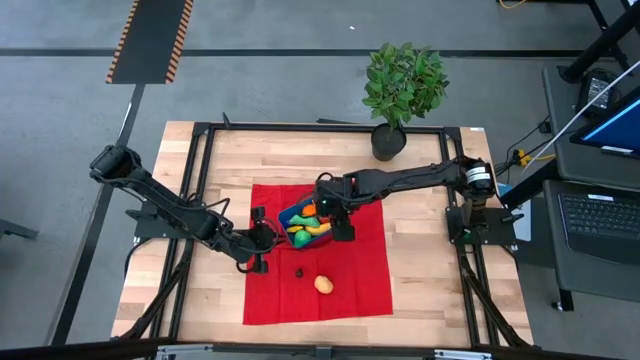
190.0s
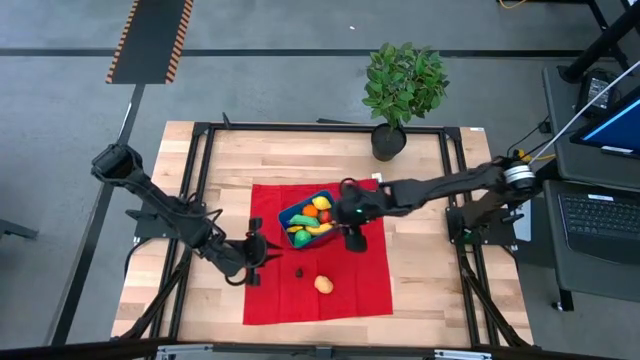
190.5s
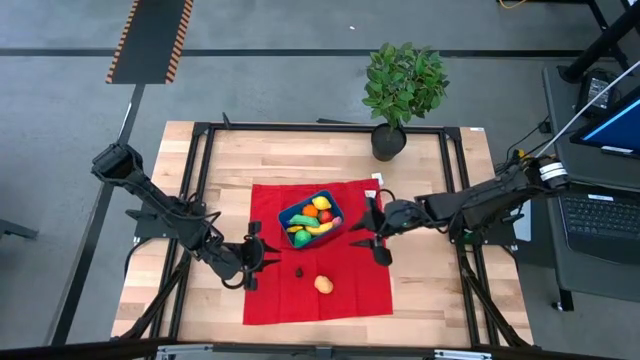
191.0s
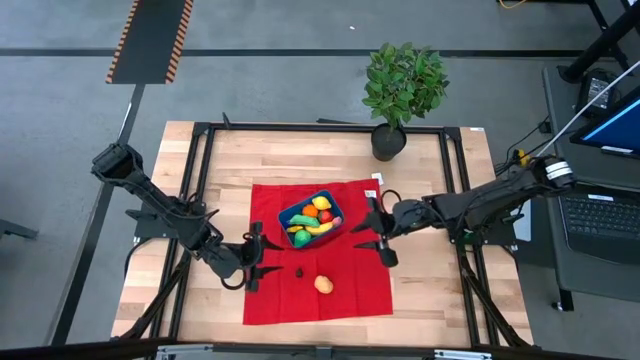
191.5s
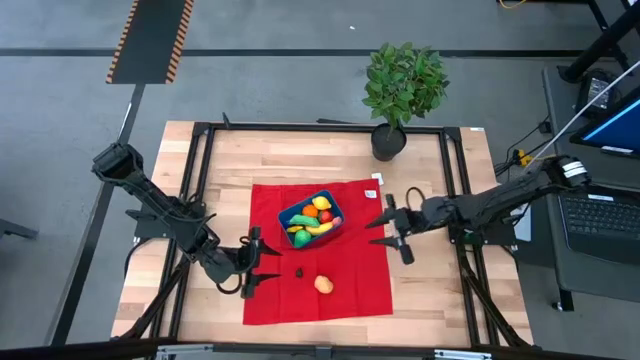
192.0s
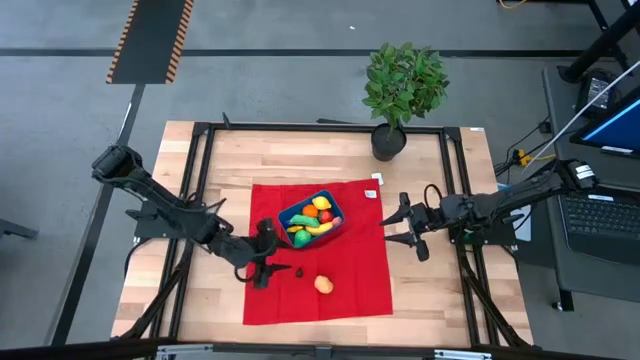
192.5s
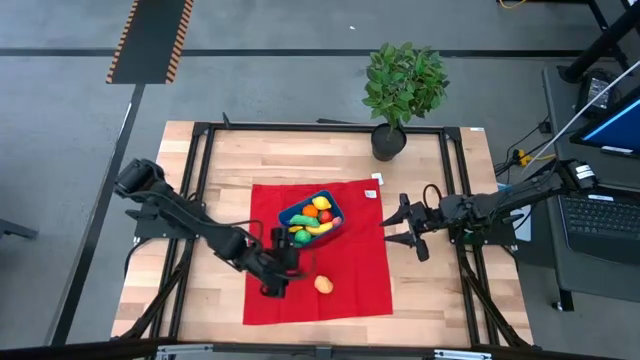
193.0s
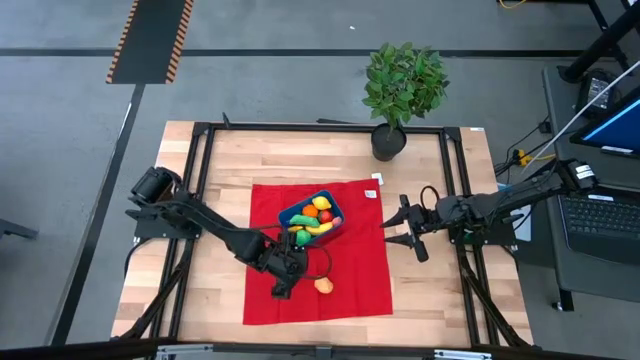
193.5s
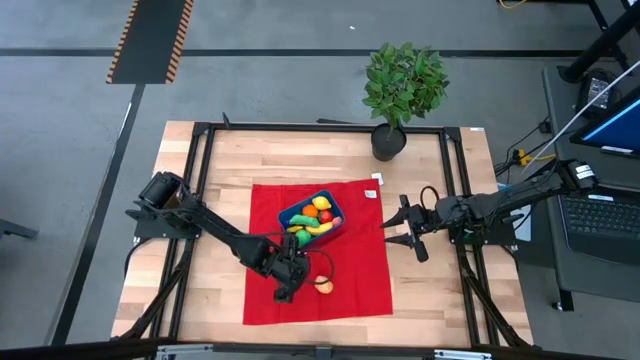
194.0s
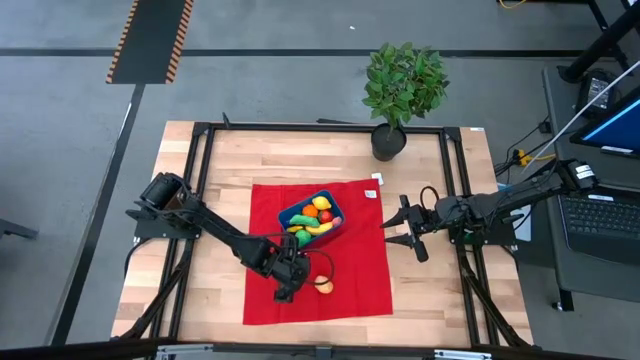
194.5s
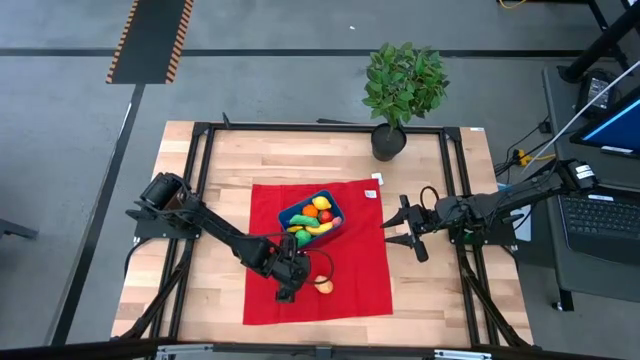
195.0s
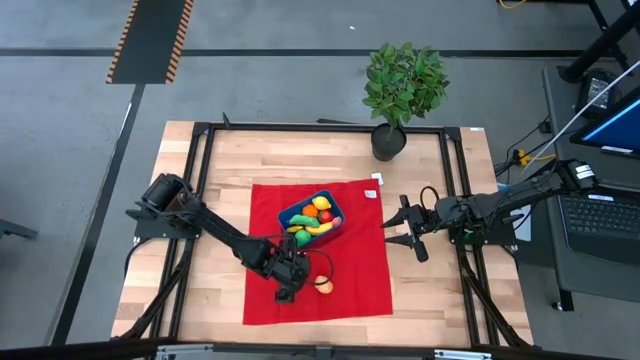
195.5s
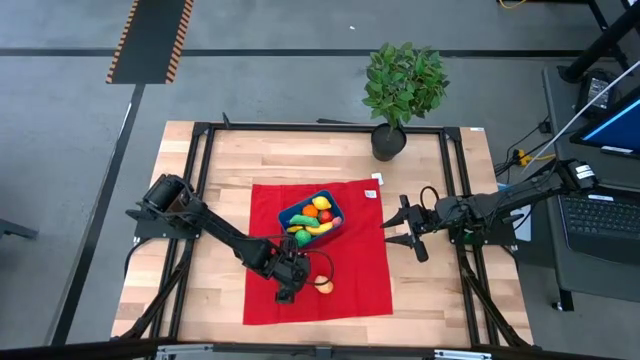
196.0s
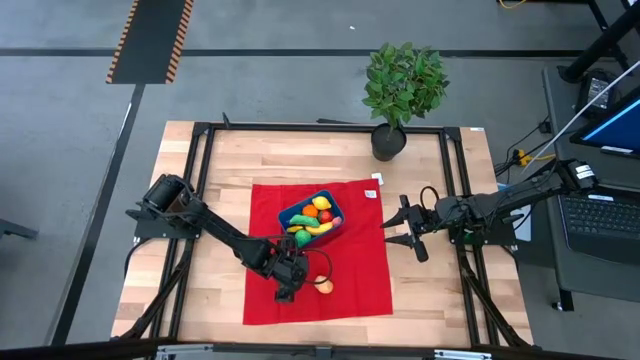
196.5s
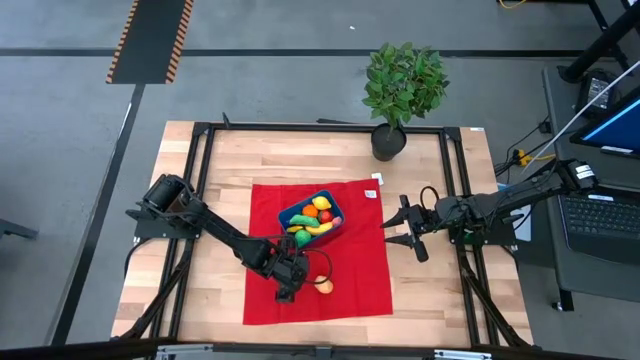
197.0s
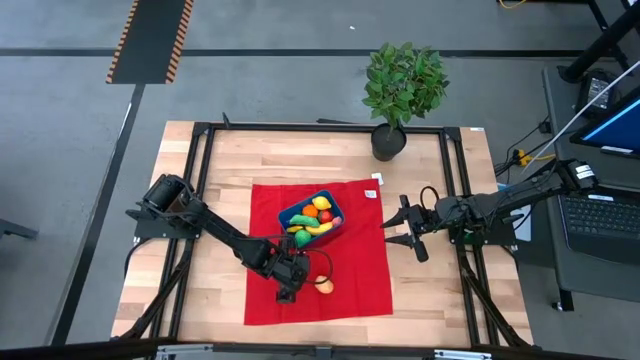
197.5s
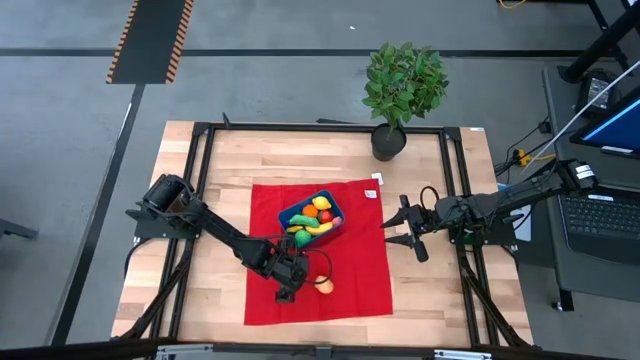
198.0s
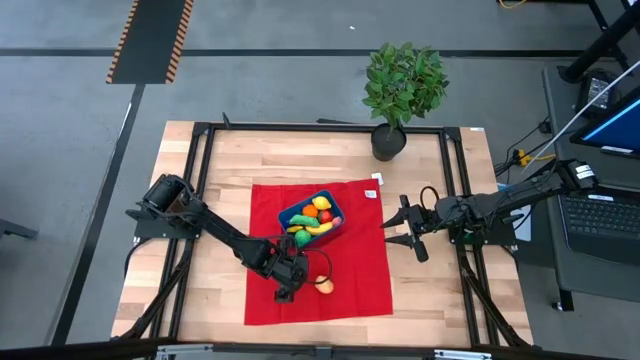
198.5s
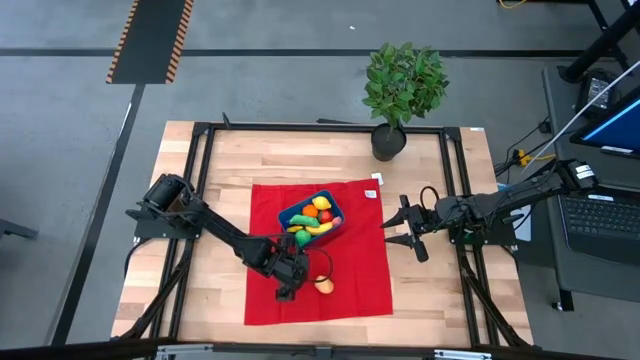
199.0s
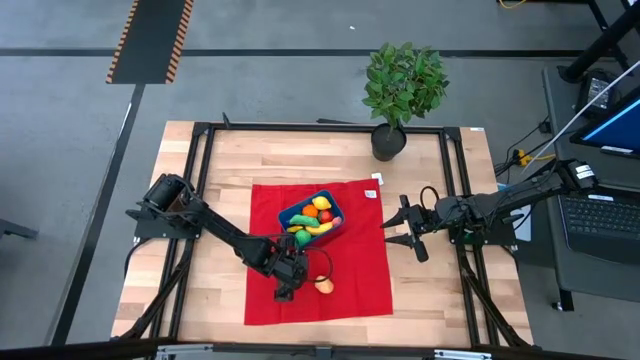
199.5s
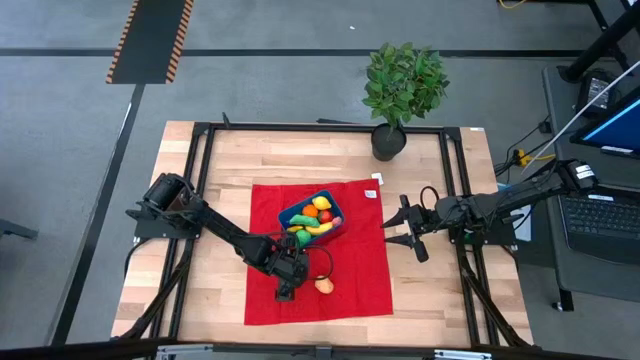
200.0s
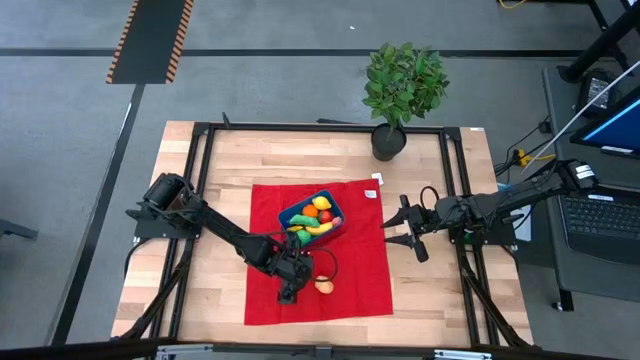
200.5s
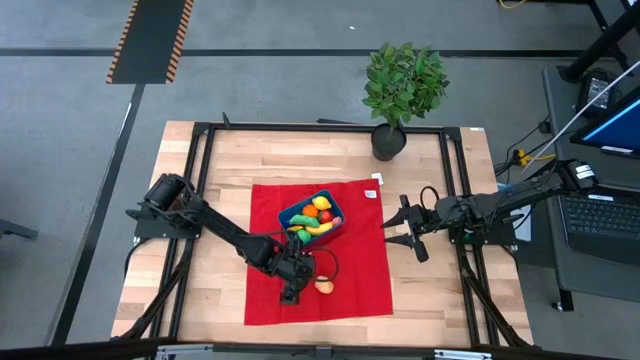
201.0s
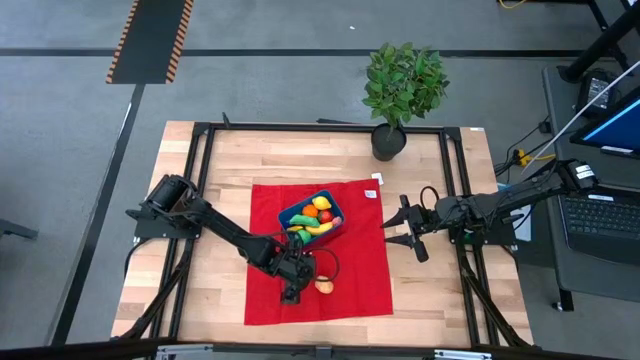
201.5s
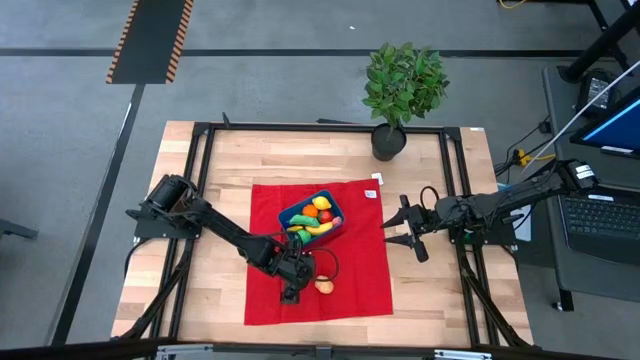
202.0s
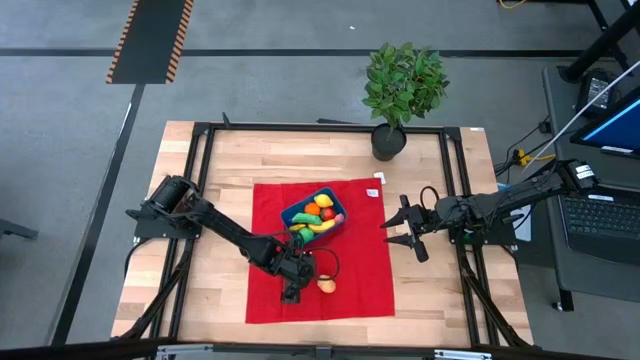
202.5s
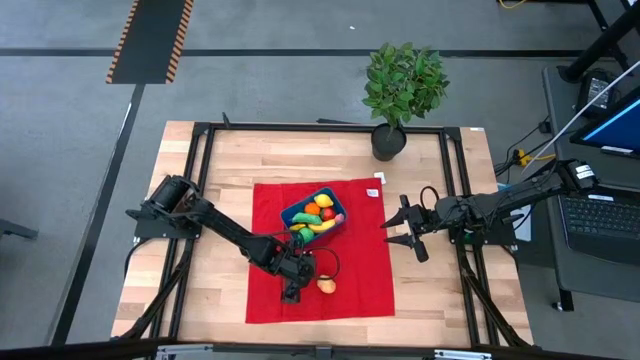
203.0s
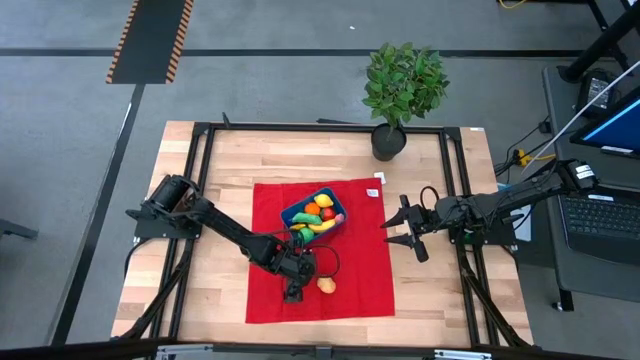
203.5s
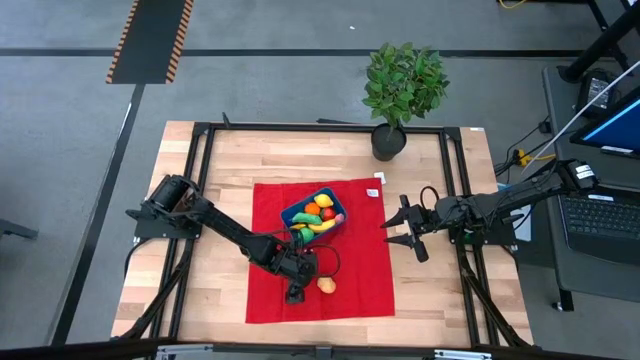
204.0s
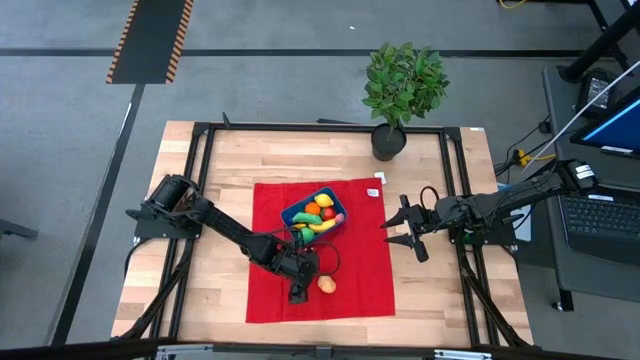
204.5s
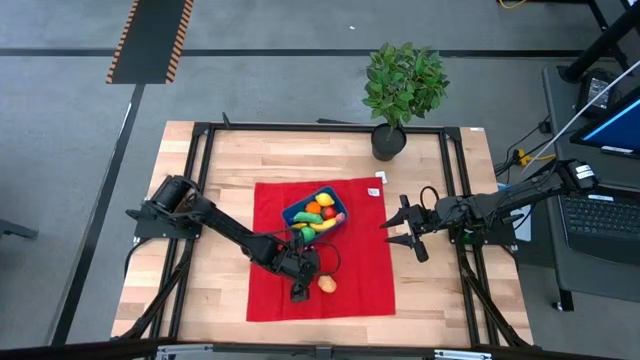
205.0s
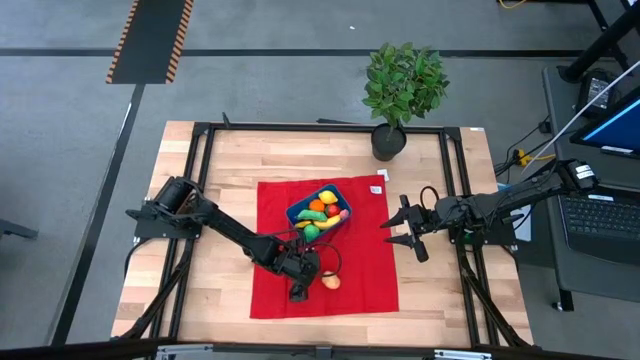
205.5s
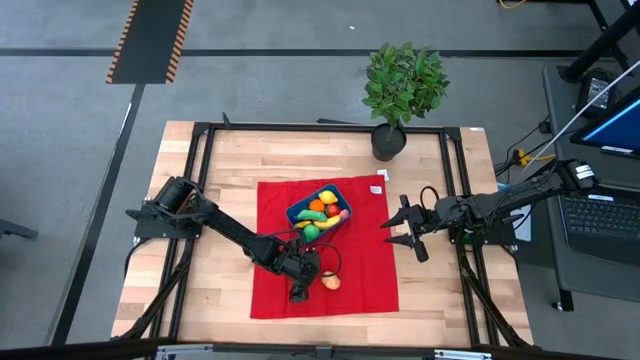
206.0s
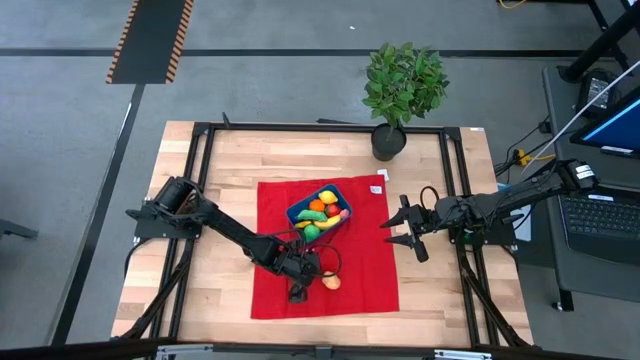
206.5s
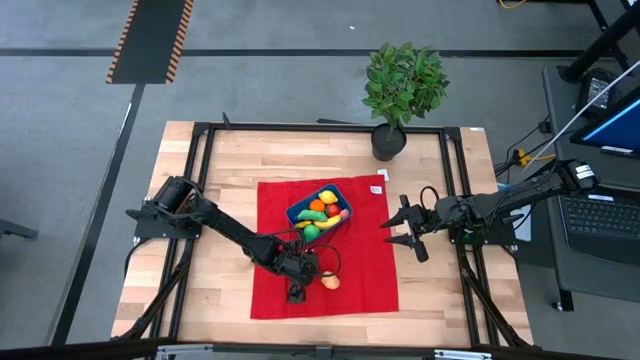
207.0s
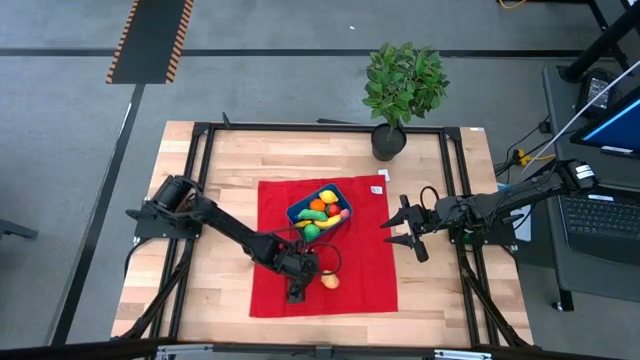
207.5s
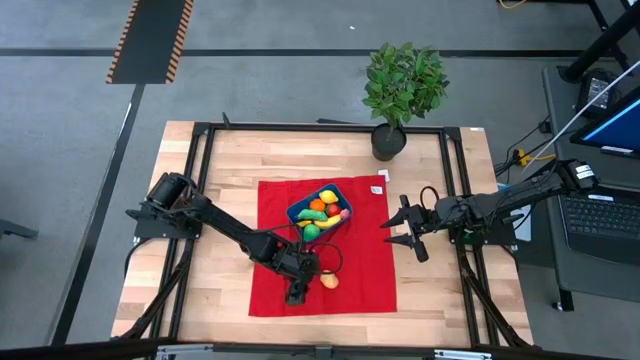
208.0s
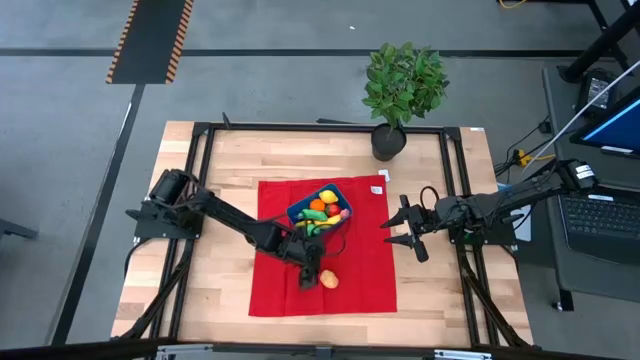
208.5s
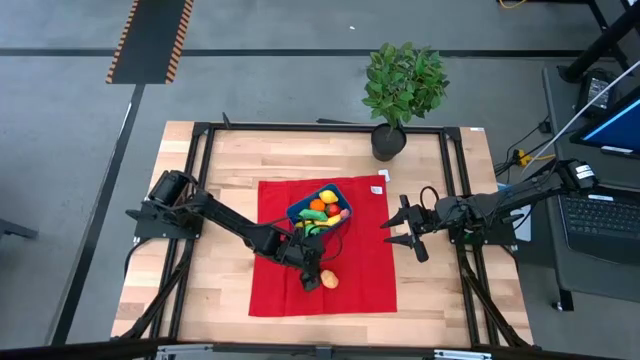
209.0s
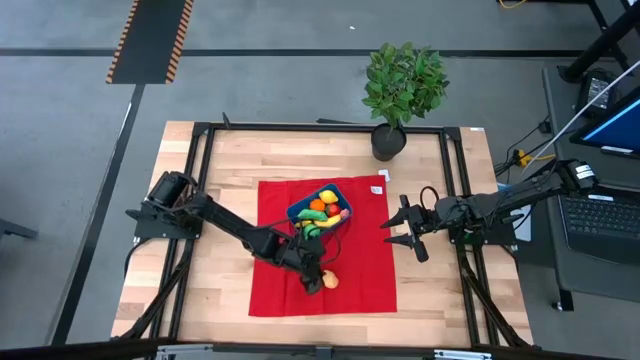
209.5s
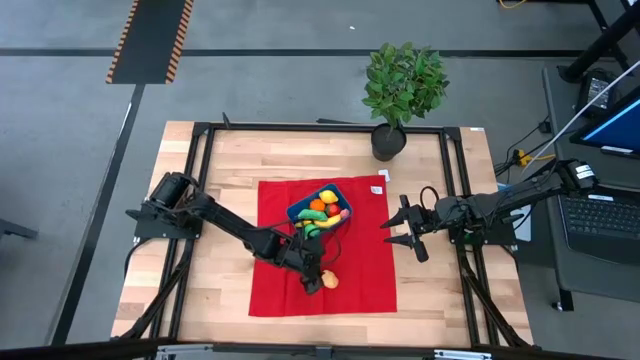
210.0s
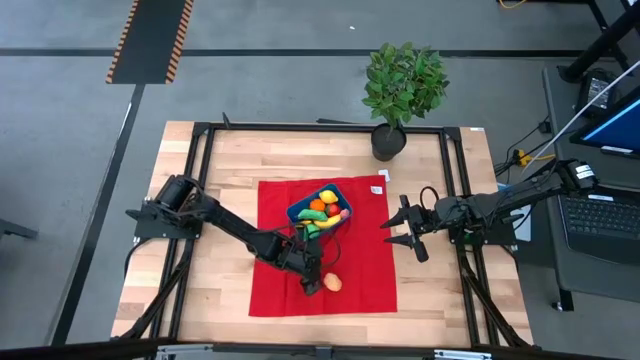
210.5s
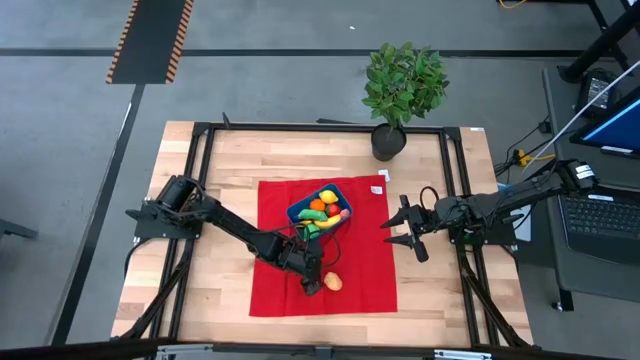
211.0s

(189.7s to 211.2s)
Task: Pick and placing Produce into tupperware
Put the blackberry into the blue bin
